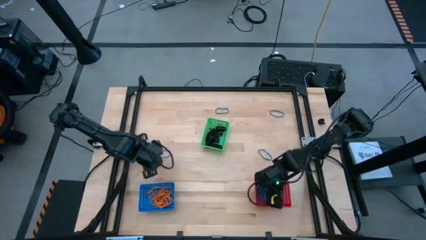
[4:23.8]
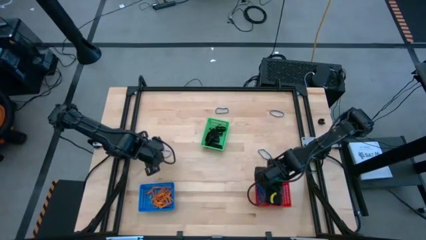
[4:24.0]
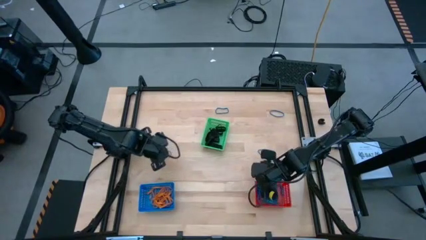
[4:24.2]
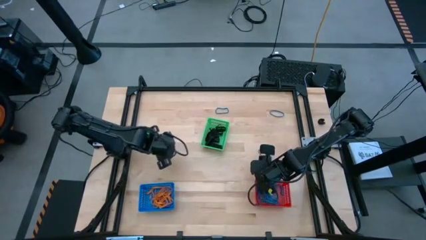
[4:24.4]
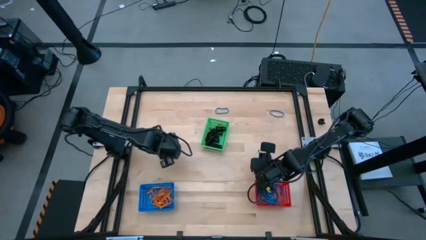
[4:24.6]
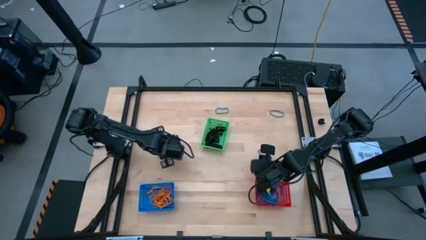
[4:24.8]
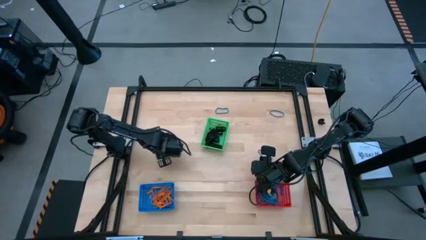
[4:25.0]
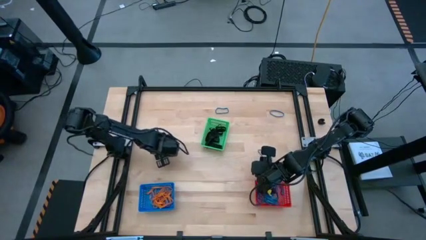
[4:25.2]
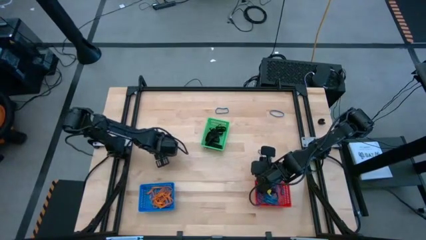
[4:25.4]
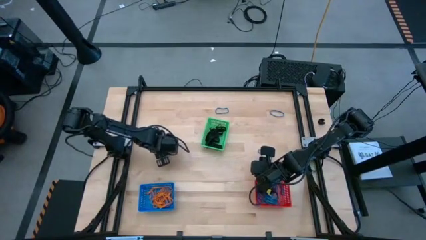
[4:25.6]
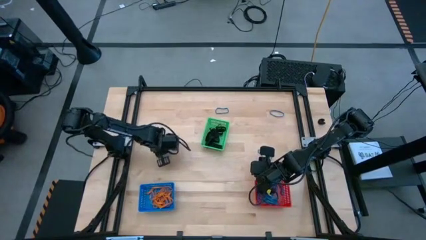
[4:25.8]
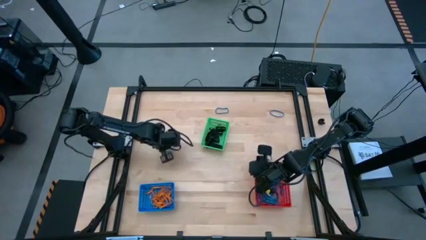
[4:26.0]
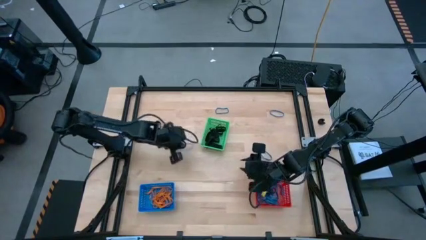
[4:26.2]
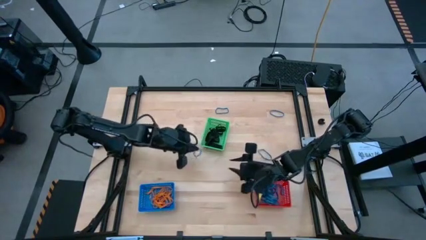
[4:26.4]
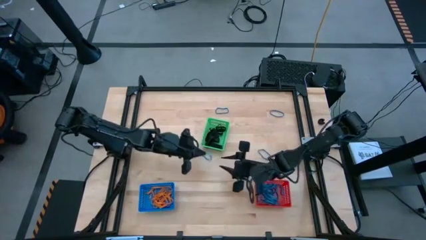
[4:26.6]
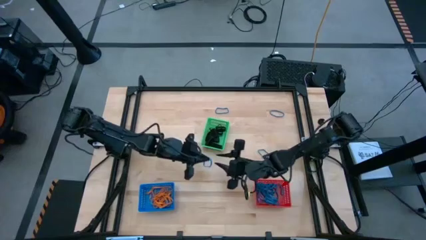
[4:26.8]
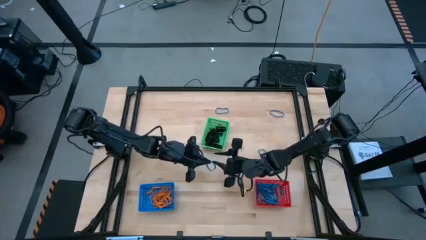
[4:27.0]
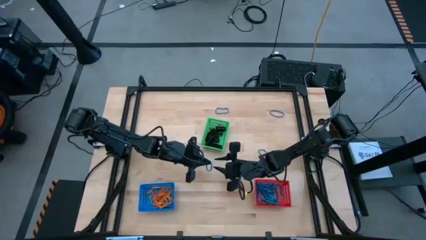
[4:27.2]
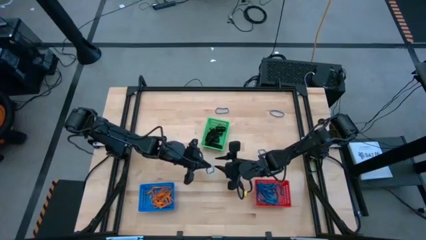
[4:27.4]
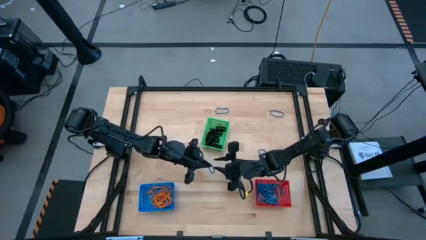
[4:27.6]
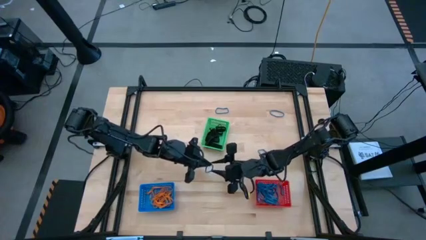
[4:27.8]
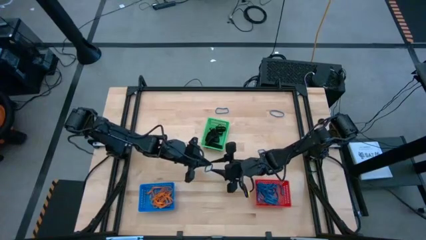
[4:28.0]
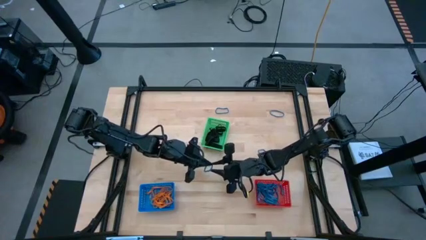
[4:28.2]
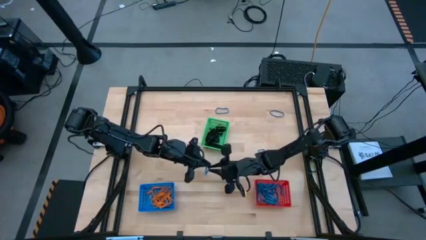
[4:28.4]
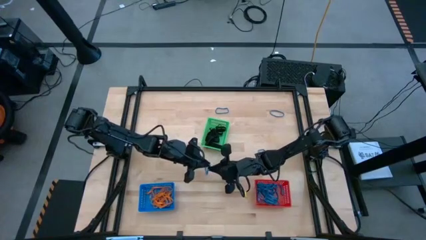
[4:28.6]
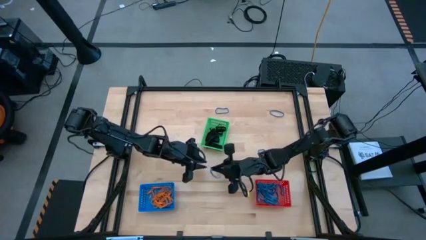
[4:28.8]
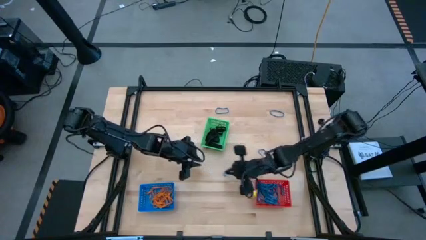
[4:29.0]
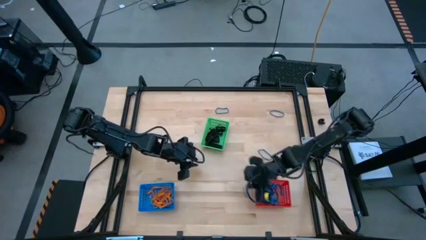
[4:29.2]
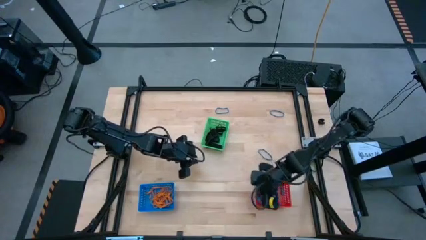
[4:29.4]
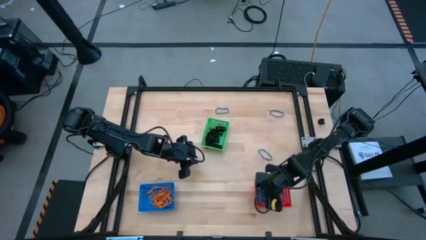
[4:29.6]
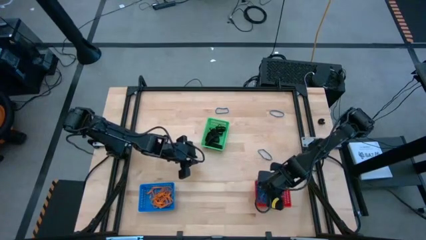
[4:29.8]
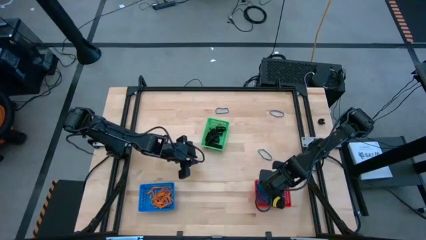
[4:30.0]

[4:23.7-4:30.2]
Task: Sort rubber bands into baskets
Put the blue rubber band into the red bin

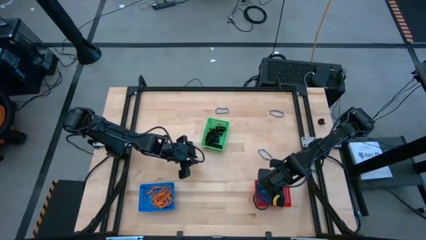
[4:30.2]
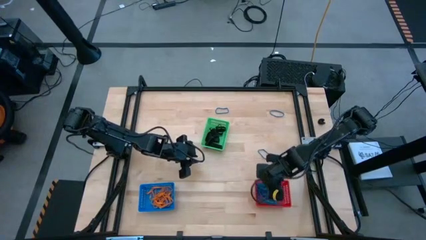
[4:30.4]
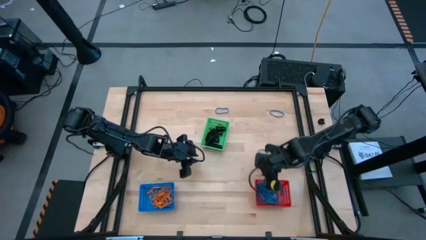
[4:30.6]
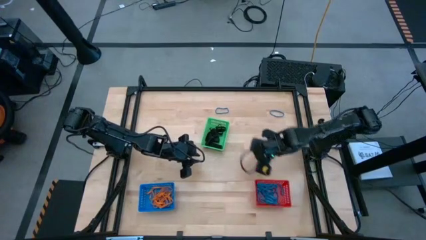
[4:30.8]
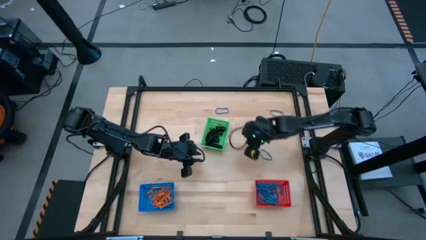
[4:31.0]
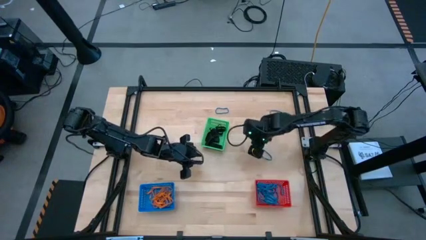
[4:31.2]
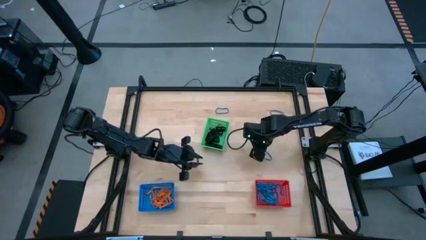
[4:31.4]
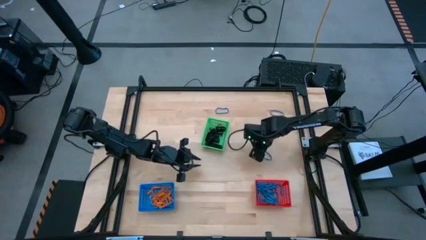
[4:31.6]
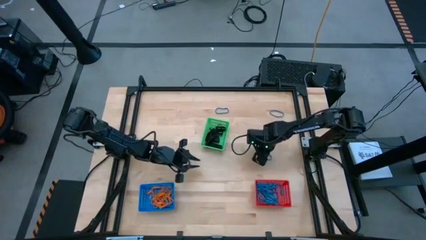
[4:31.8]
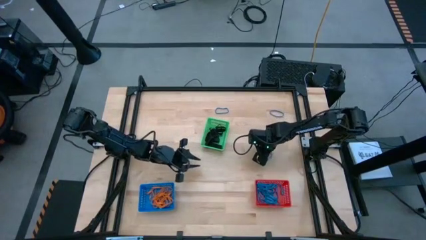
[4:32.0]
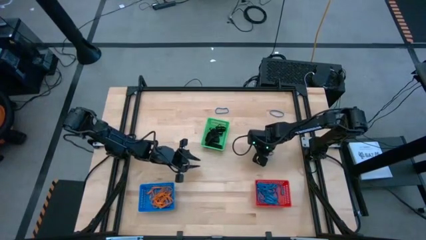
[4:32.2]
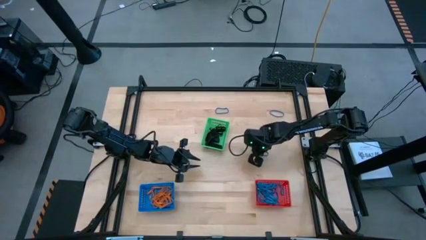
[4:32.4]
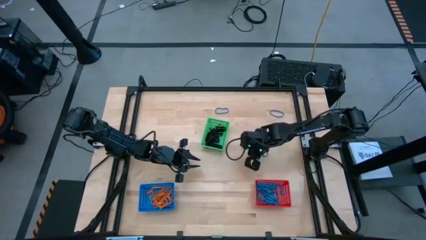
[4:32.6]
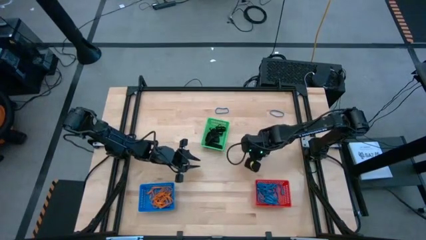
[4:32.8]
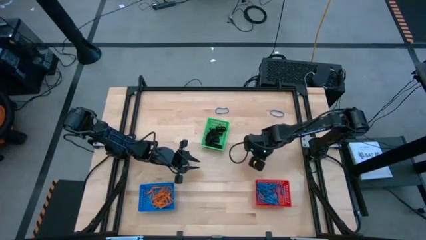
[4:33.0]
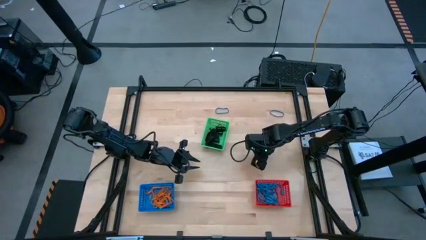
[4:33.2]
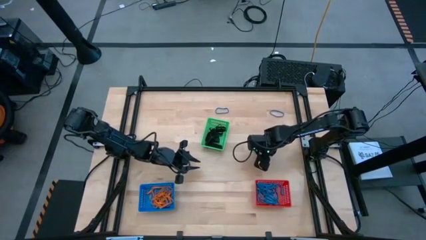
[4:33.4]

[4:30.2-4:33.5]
Put the blue rubber band into the red bin

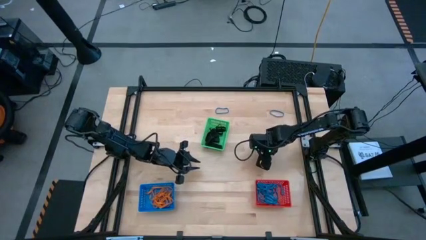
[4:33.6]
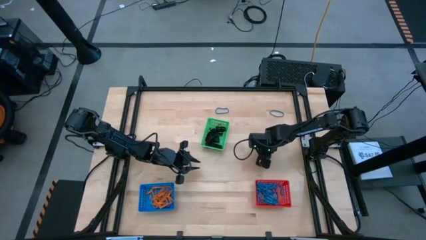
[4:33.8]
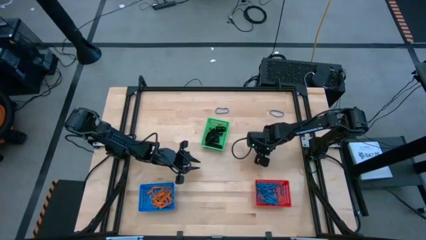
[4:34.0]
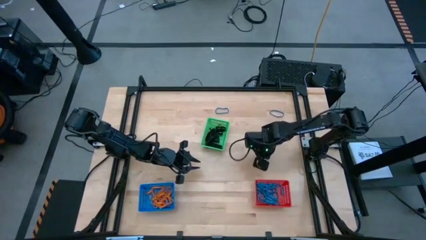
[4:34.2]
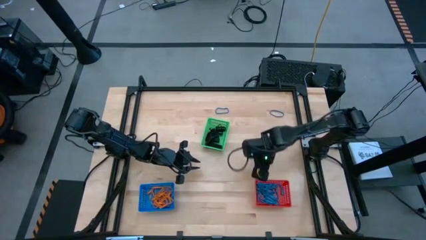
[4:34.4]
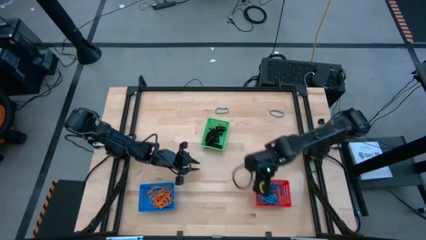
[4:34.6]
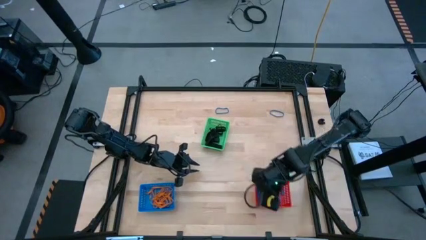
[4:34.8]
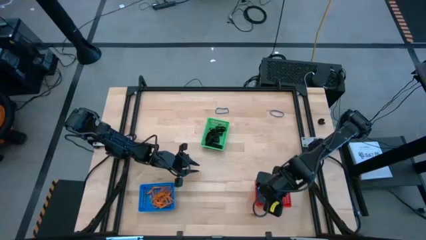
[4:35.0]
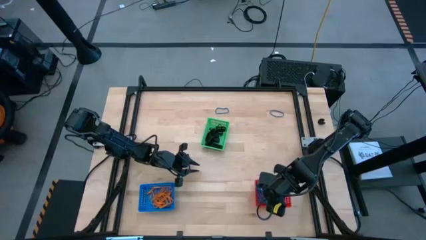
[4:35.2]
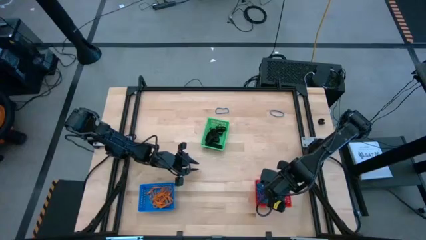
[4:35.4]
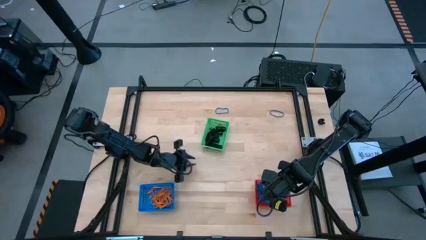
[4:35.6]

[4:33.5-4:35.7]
Put the blue rubber band into the red bin

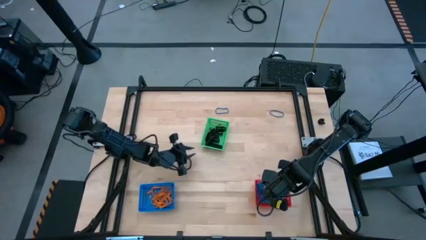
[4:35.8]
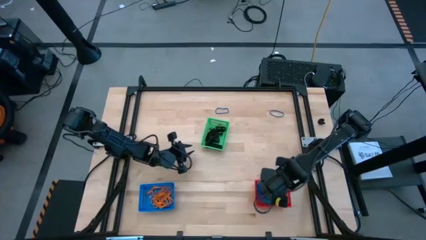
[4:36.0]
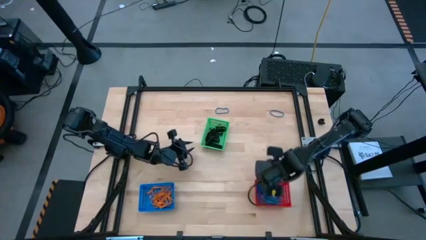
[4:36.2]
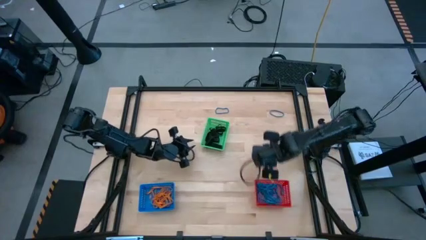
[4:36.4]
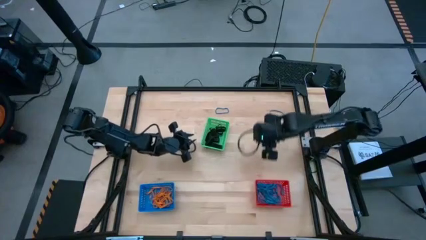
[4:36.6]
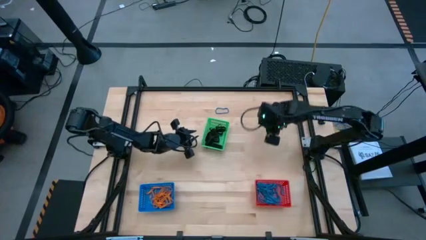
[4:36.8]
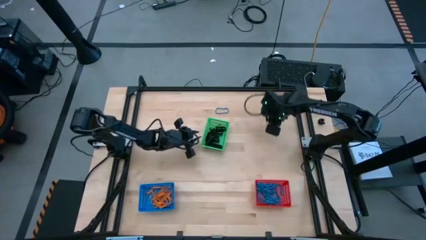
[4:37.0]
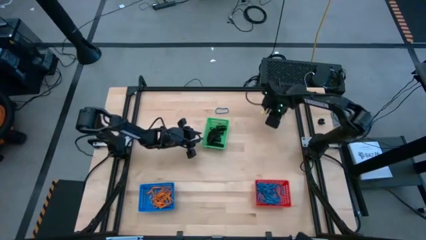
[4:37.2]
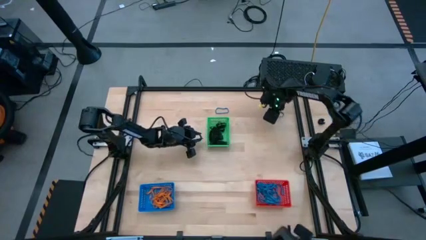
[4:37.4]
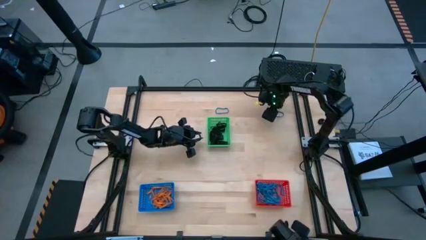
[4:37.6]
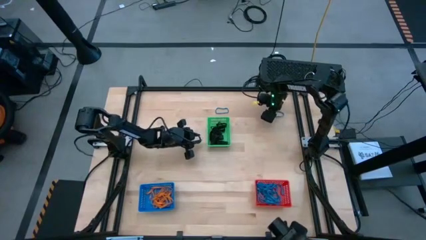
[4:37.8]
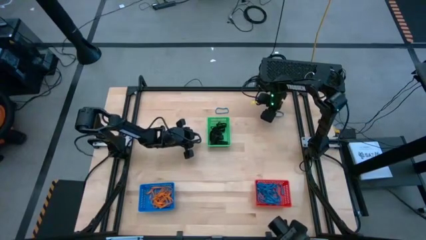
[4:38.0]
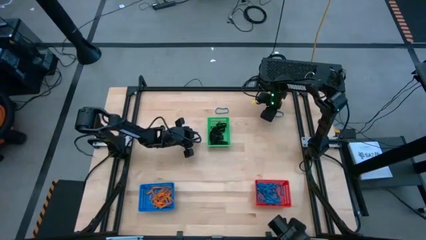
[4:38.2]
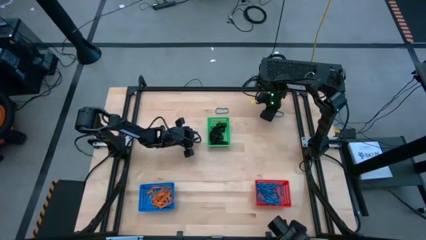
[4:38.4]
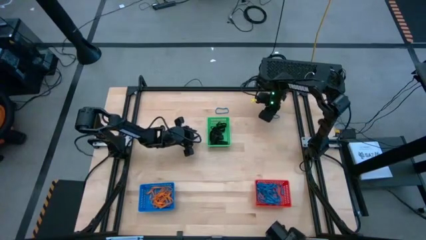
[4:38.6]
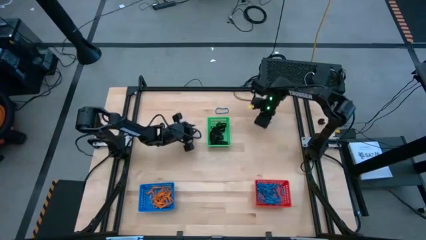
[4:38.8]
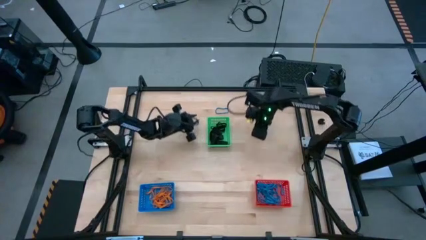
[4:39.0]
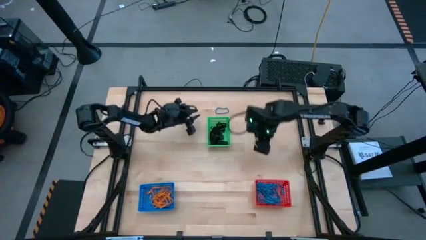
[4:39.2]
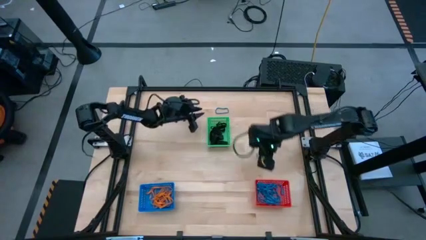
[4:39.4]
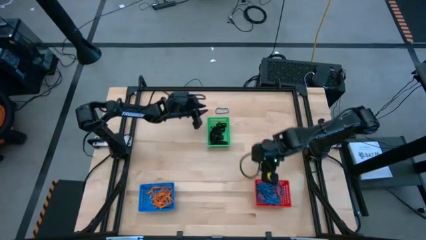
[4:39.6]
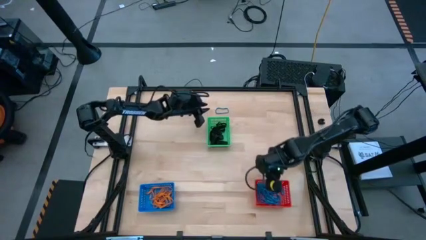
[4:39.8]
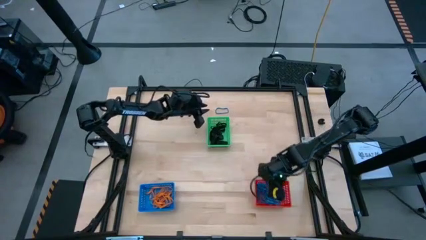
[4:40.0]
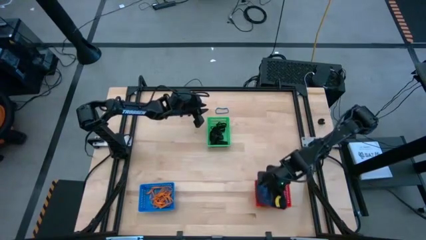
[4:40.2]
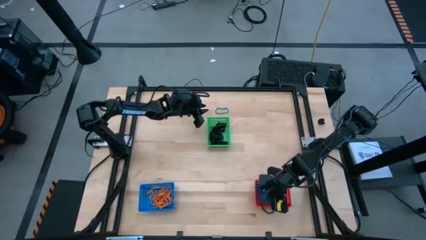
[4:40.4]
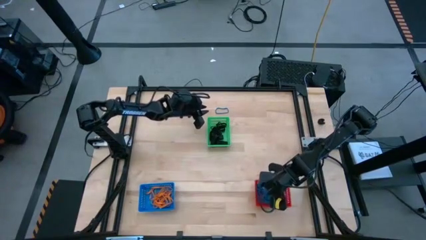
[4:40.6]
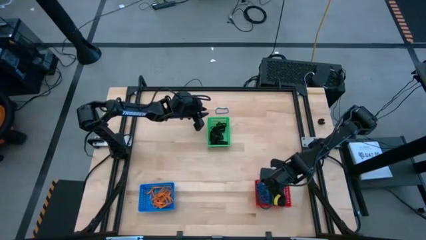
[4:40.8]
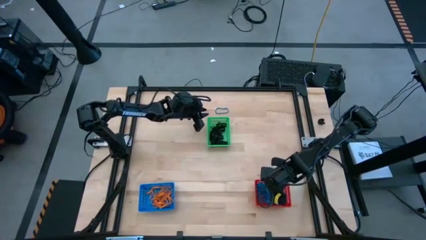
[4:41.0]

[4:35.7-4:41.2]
Put the blue rubber band into the red bin
